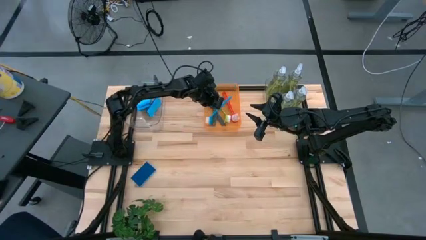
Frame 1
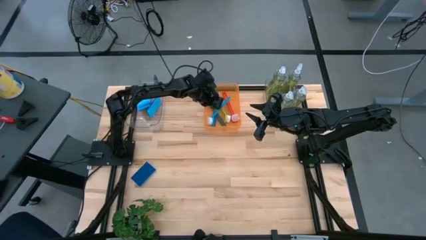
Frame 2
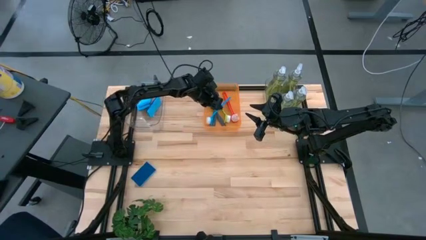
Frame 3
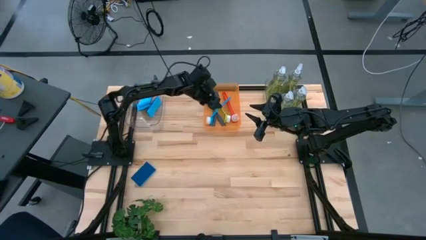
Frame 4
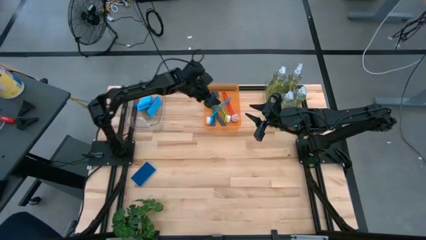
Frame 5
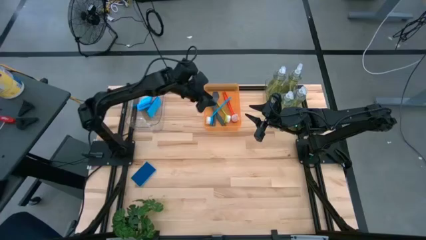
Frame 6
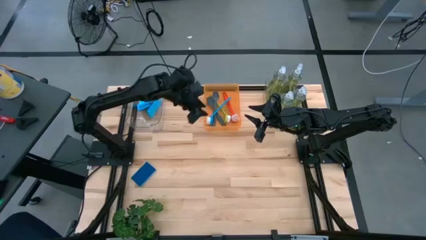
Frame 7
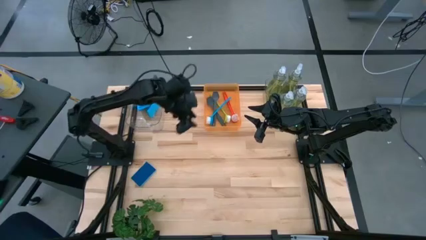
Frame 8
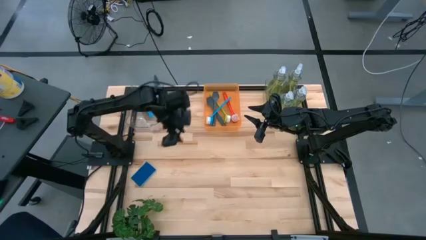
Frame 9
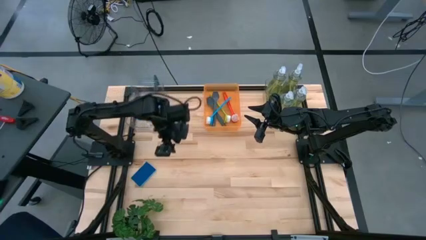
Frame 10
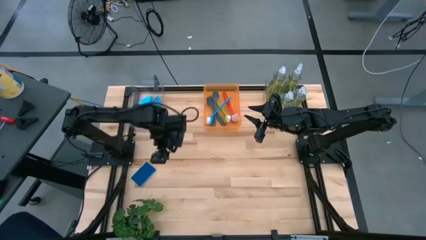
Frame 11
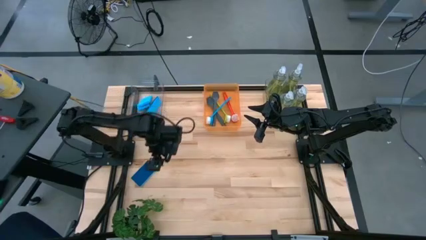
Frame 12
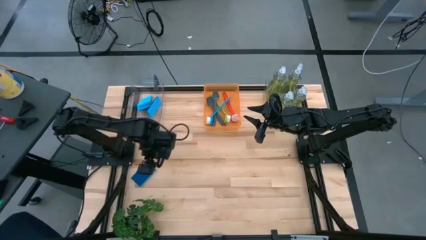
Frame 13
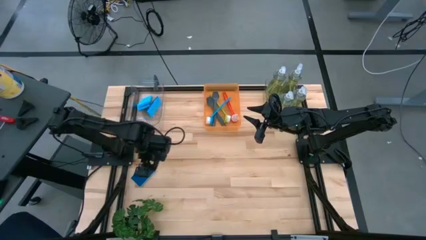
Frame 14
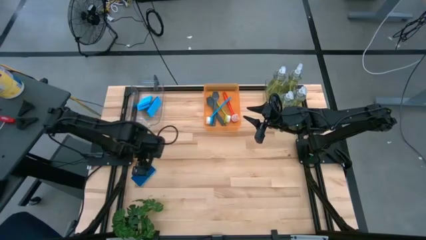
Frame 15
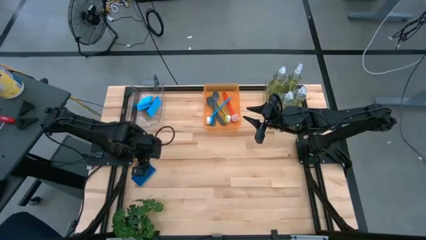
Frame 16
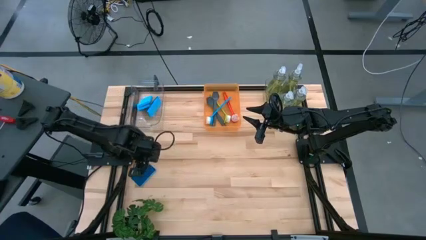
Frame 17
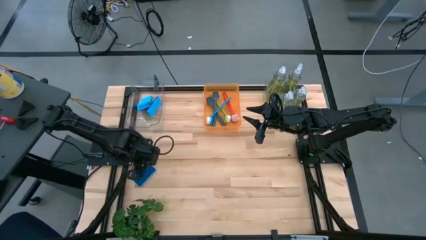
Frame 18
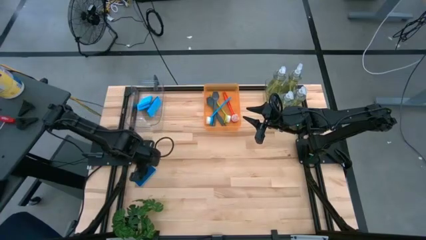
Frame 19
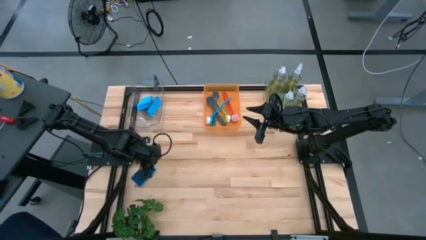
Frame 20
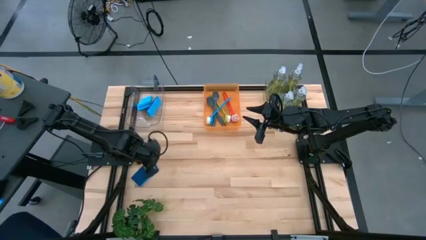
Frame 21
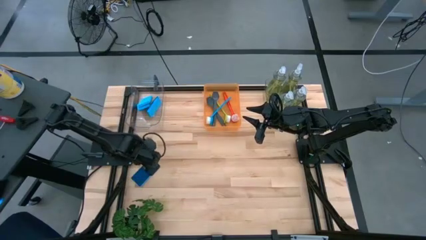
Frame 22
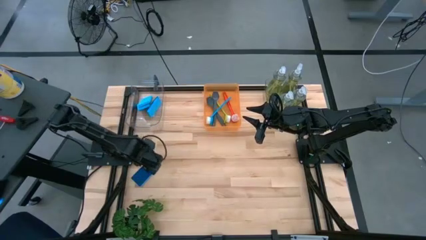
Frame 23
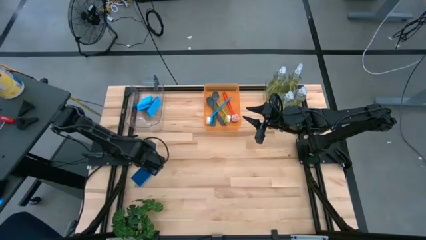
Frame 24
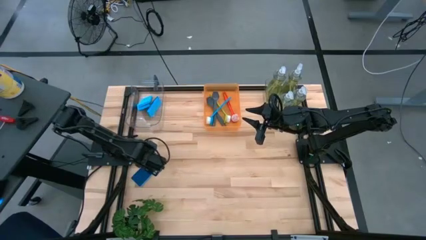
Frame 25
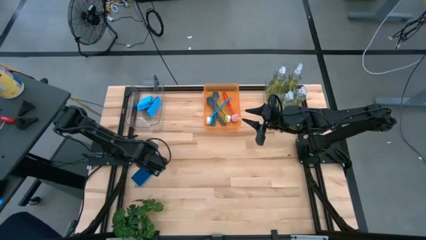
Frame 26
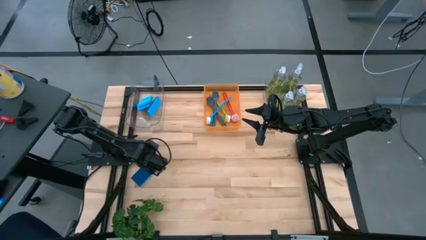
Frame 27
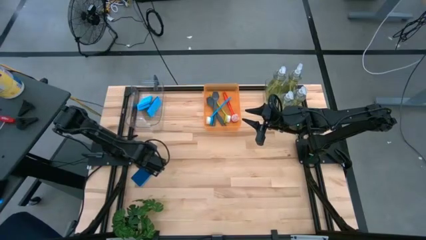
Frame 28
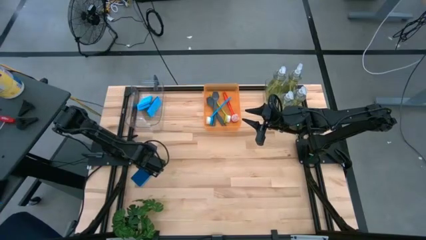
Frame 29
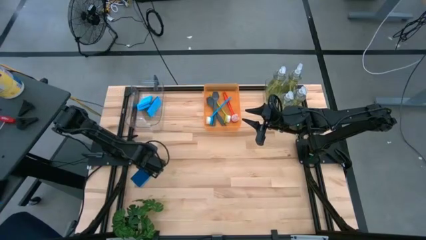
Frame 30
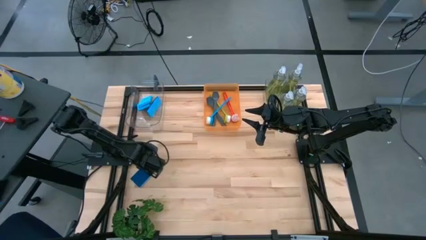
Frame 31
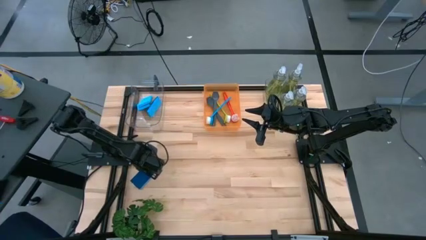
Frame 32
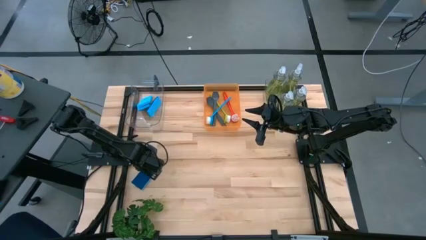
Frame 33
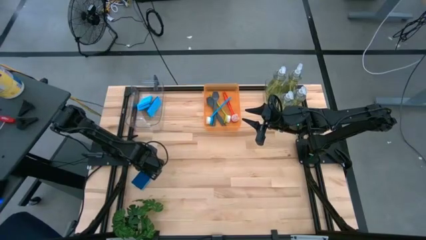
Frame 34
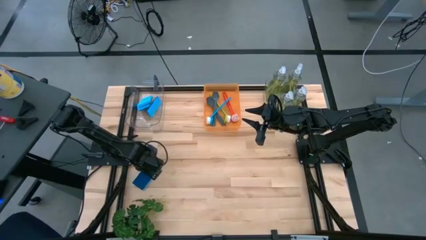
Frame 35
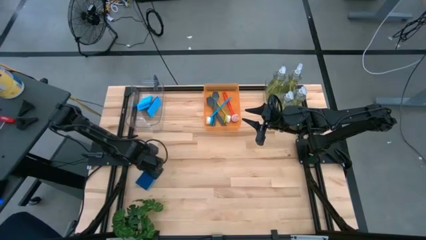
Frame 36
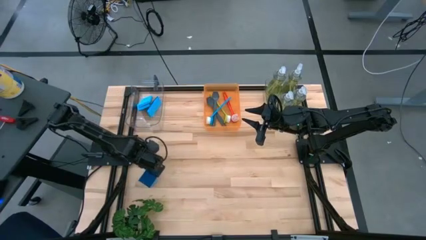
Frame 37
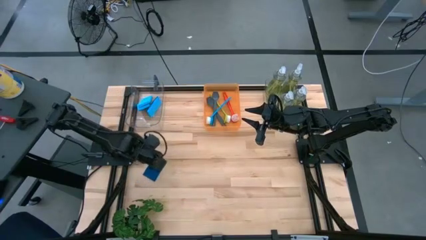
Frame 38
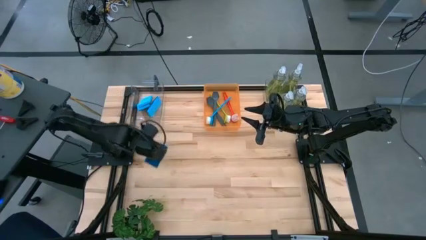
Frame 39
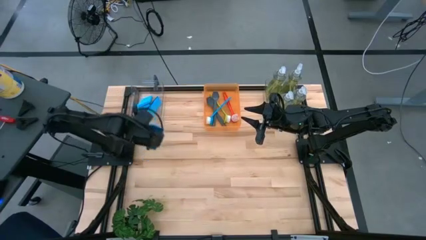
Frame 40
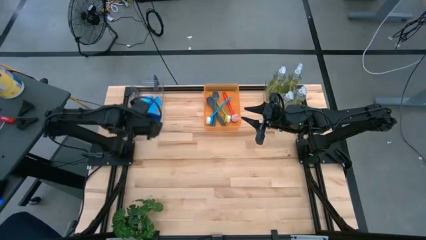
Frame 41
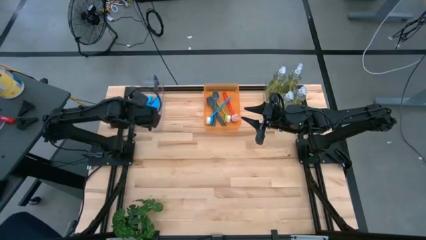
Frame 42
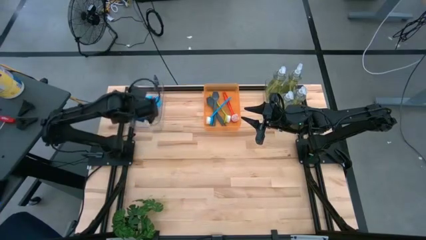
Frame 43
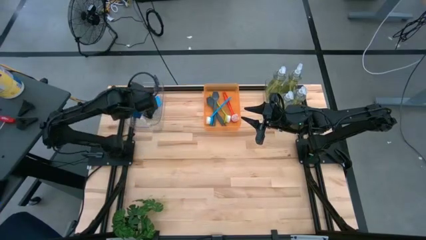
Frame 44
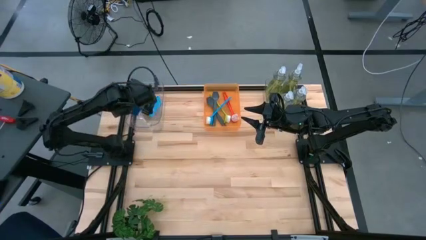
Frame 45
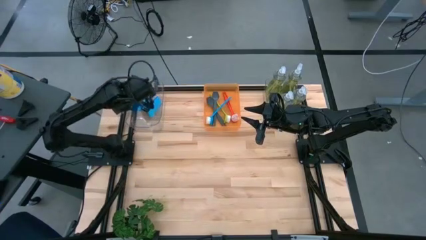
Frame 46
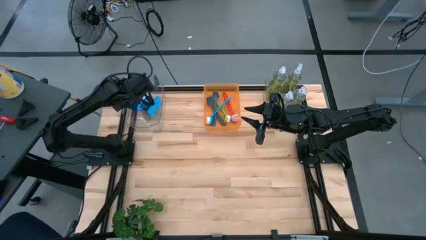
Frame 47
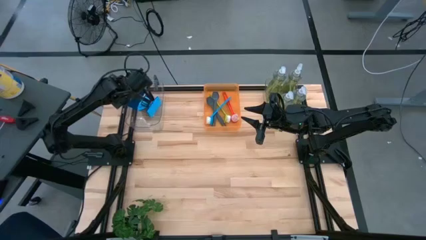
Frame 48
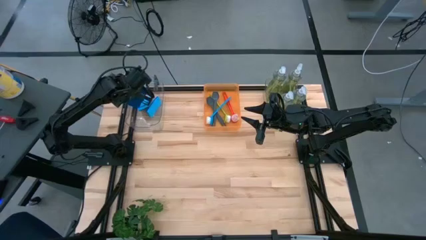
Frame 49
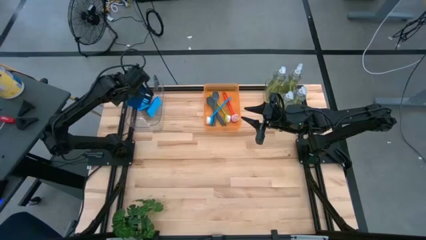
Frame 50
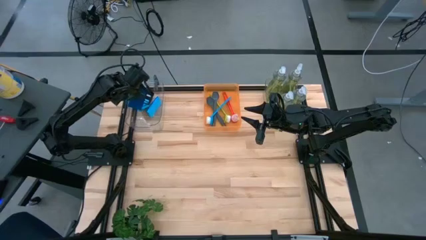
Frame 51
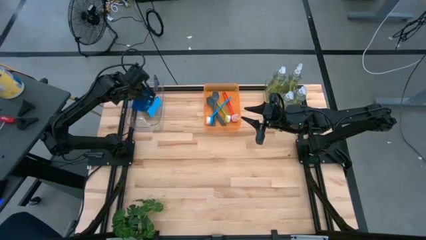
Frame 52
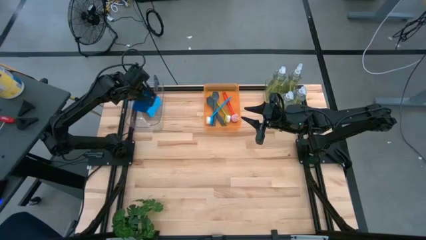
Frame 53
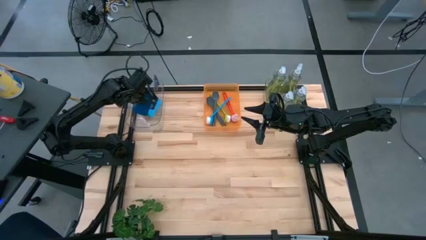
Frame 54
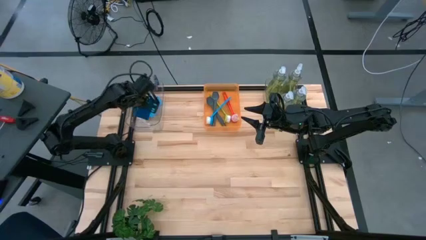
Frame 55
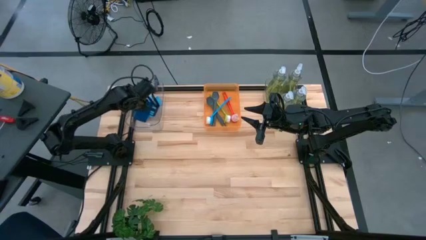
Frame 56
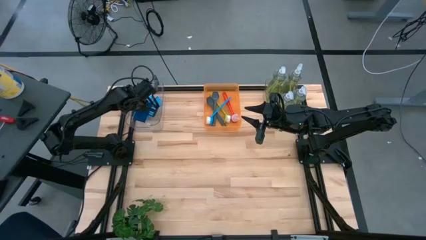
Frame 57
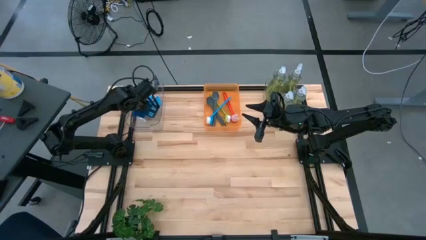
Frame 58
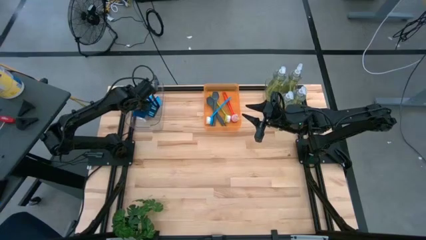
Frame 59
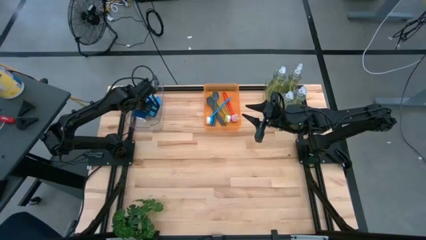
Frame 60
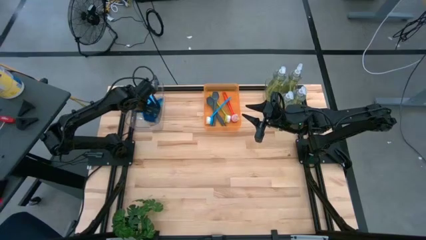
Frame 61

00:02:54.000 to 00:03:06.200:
Task: Pick & Place Kitchen Sink Supplies
Put the blue sponge into the left transparent bin

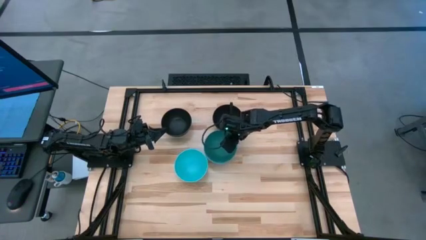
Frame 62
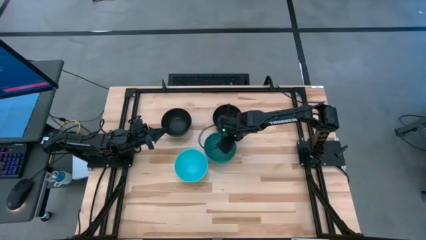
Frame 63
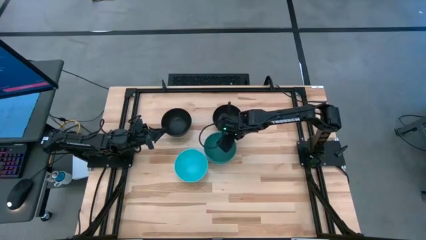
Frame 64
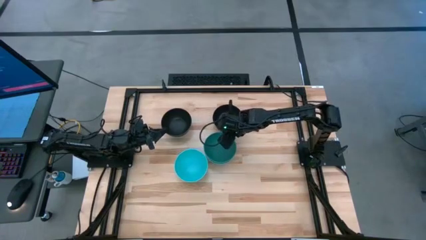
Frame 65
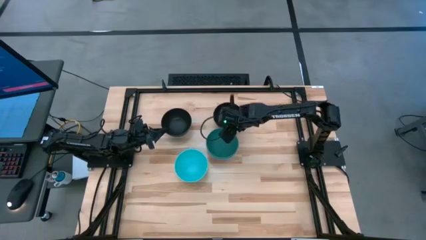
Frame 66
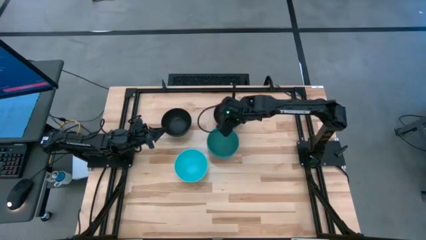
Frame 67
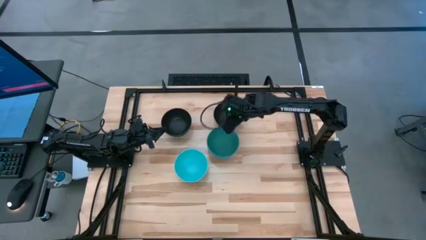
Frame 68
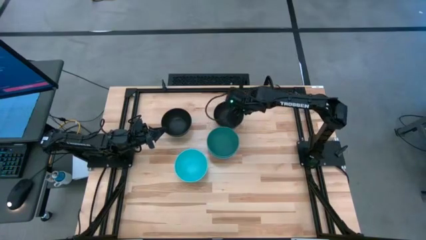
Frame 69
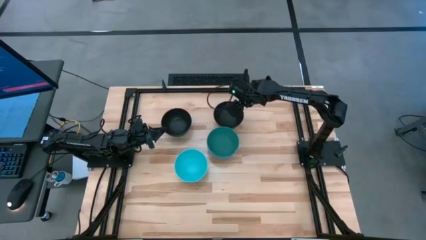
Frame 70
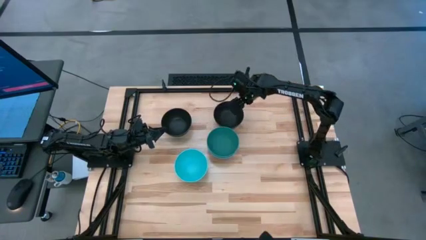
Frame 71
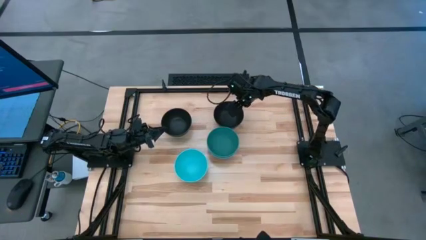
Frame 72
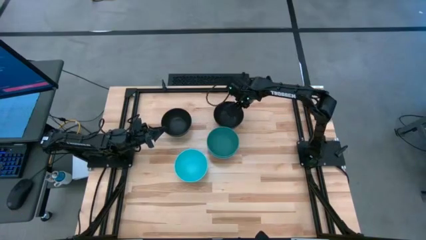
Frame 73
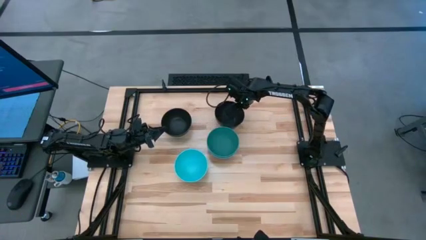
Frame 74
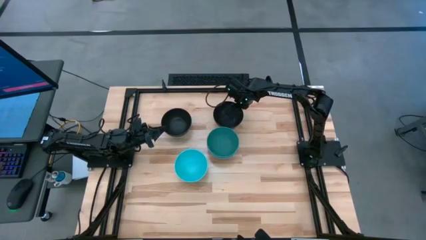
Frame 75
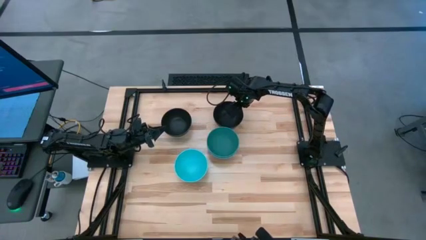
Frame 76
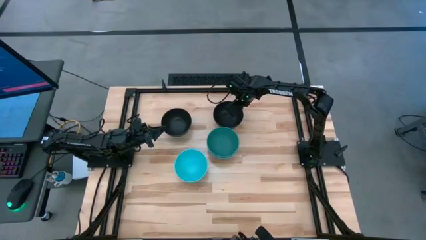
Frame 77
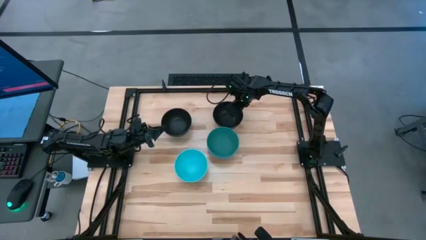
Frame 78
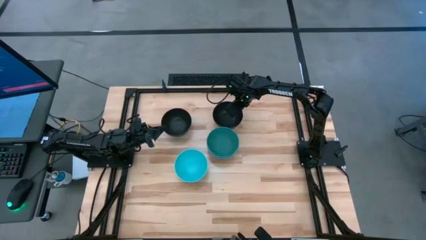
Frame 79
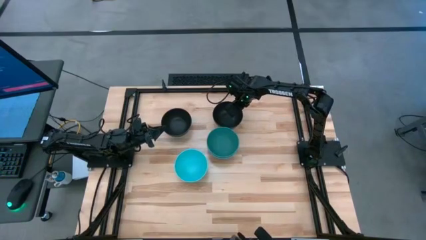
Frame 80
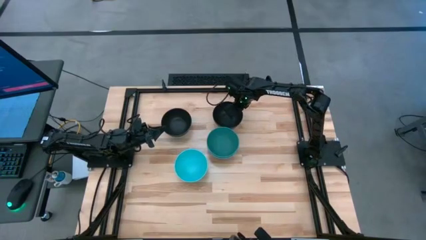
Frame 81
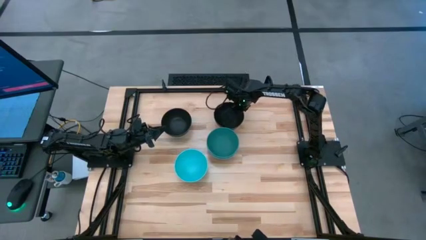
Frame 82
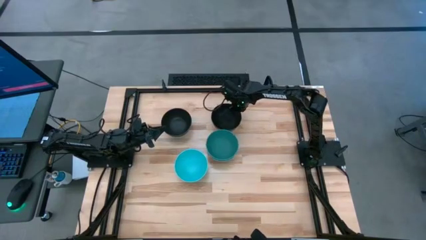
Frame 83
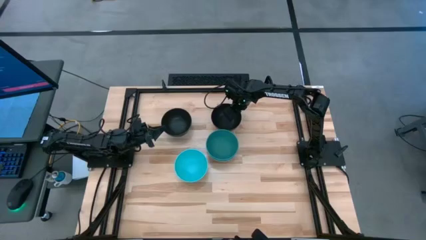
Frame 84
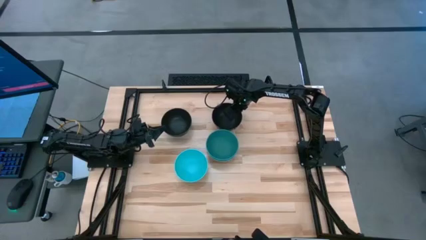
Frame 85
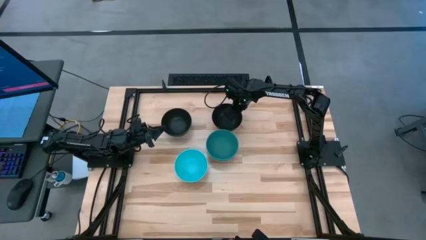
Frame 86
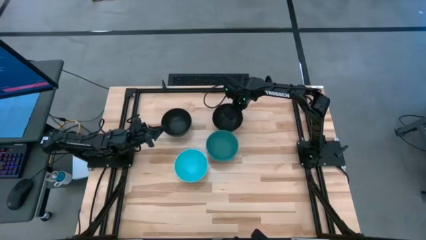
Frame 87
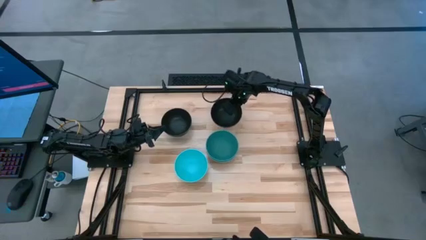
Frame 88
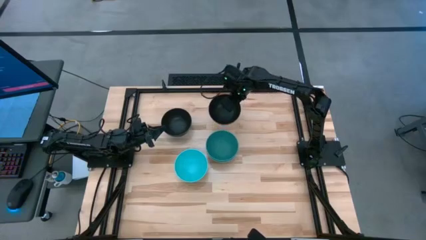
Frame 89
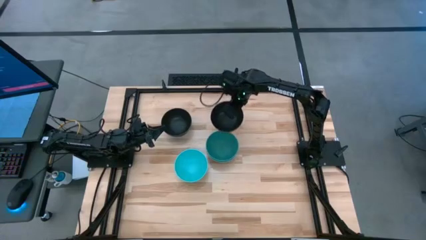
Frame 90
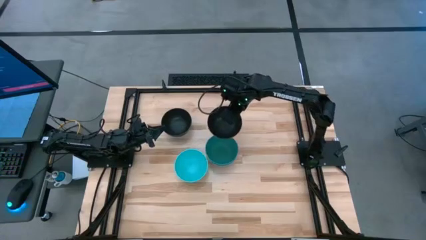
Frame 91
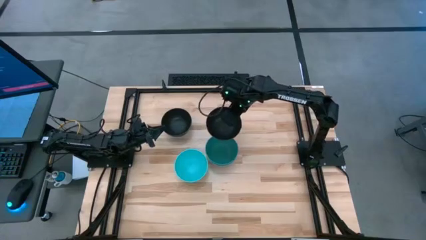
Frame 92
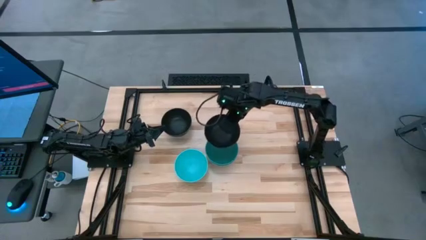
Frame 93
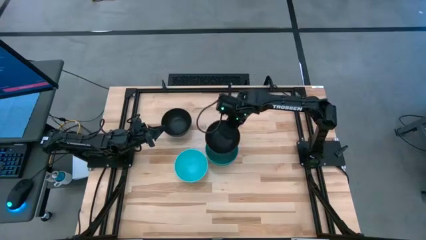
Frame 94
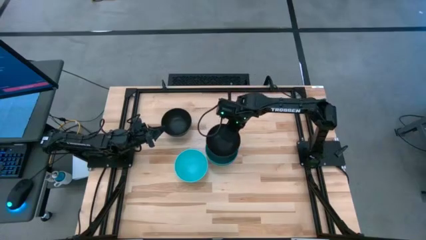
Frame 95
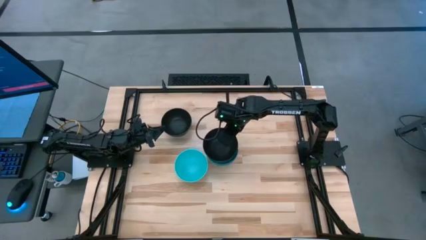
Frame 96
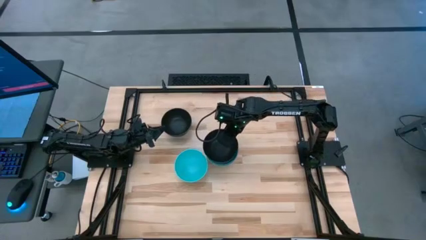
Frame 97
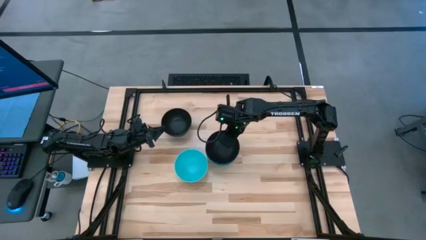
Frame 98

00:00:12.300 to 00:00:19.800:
Task: Nest bowls inside each other
Stack the right black bowl on top of the green bowl
